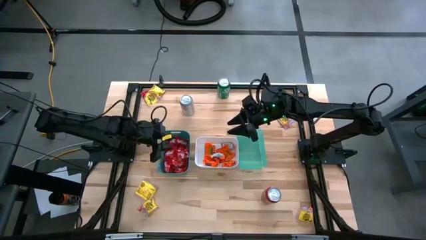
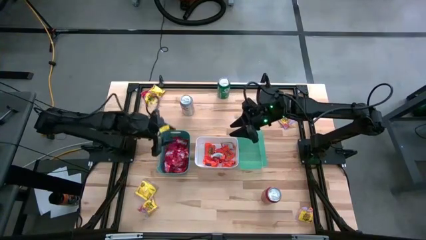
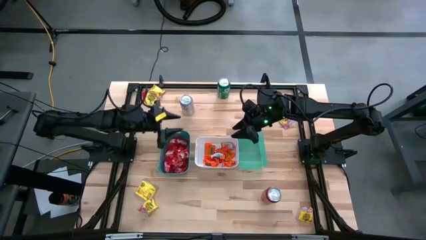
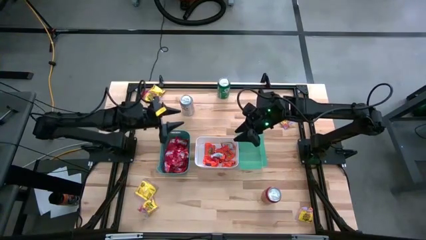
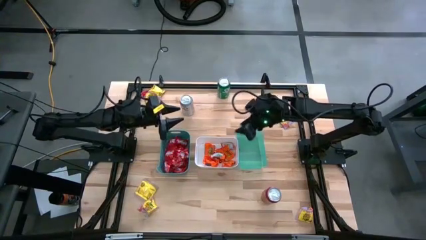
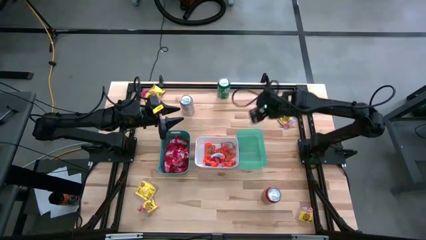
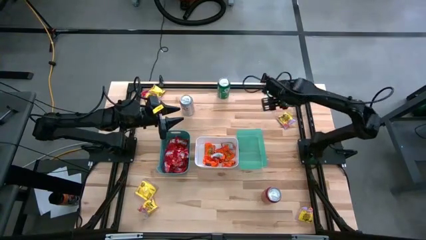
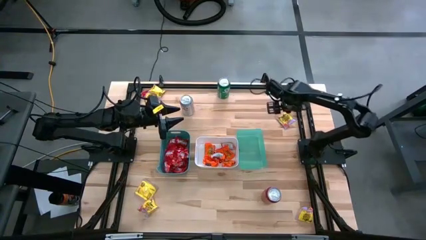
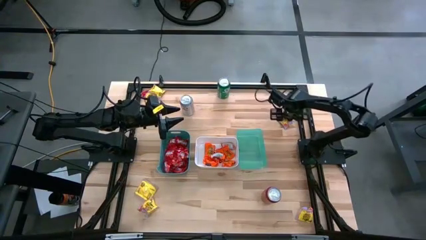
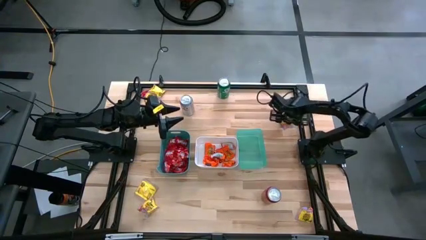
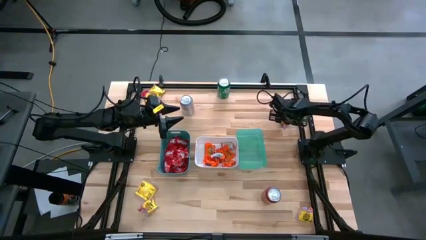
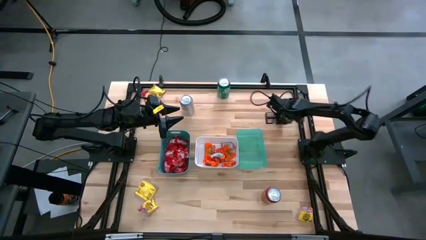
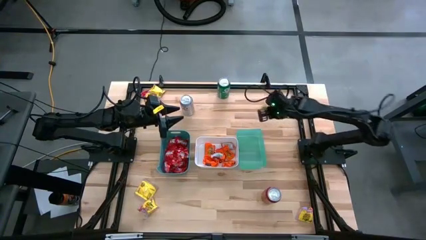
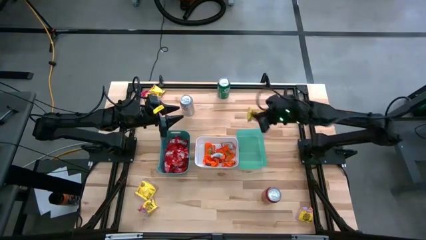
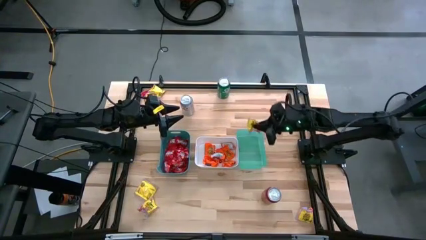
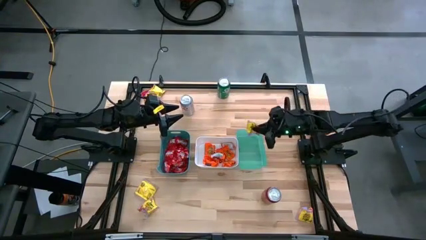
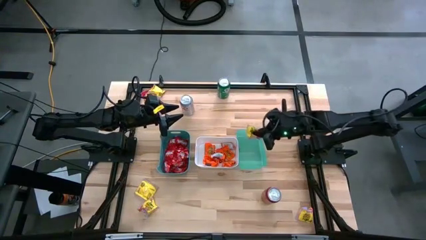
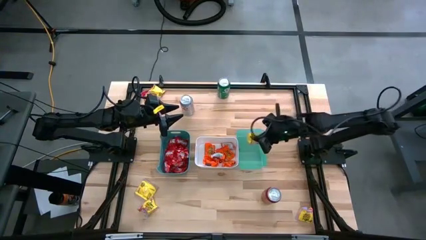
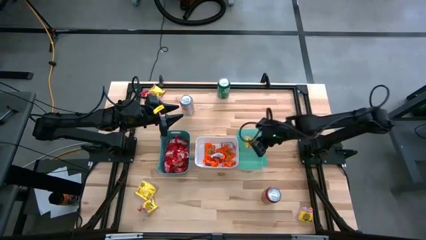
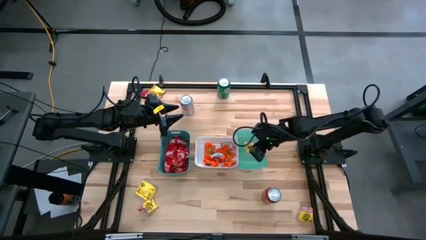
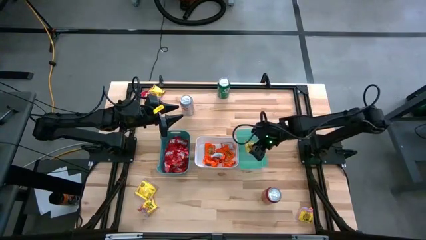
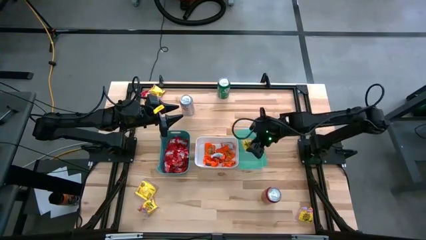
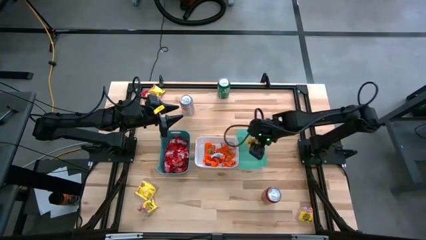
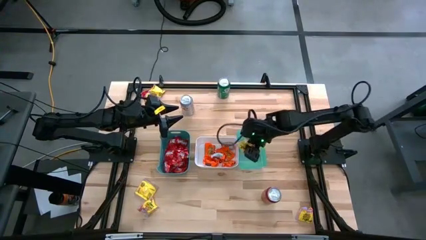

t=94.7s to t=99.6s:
Task: Sort candy
Put the yellow candy into the light green bin

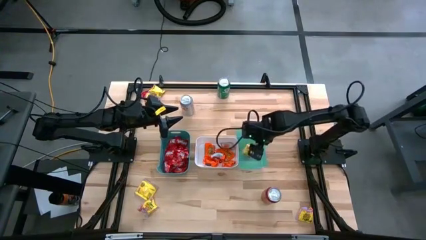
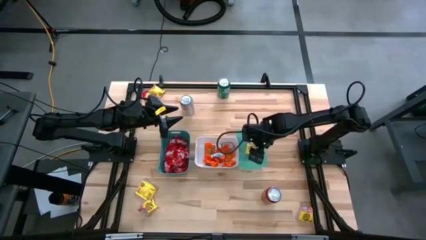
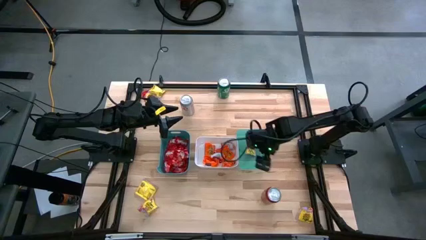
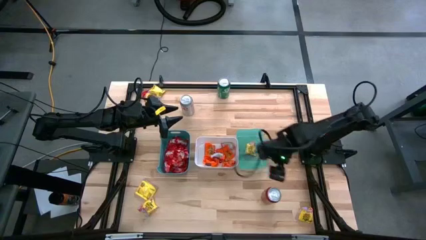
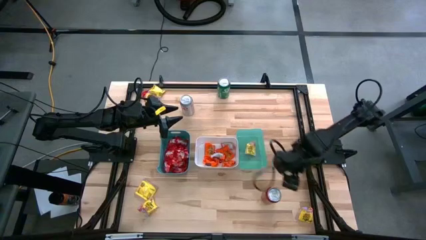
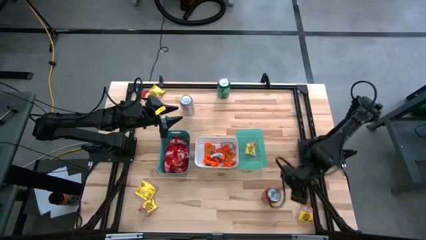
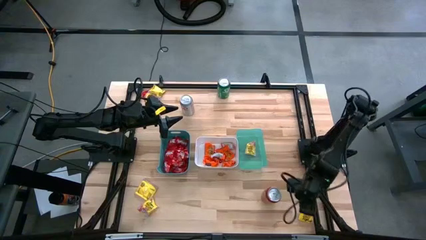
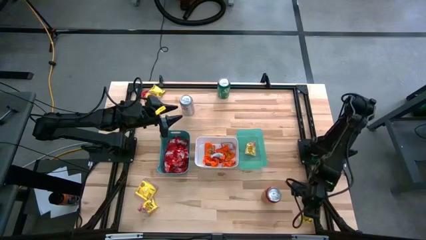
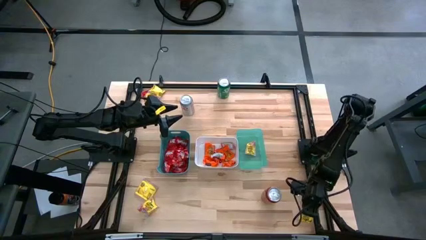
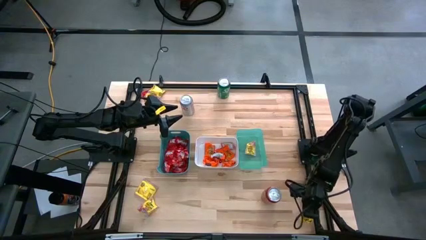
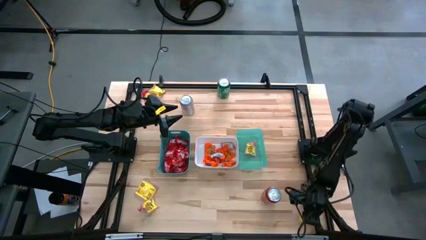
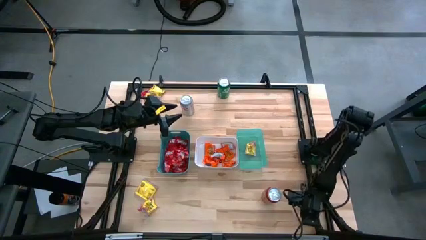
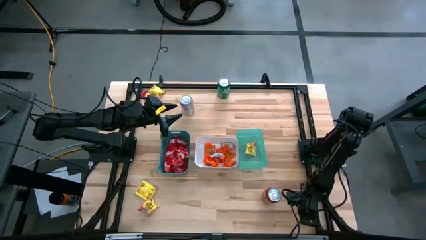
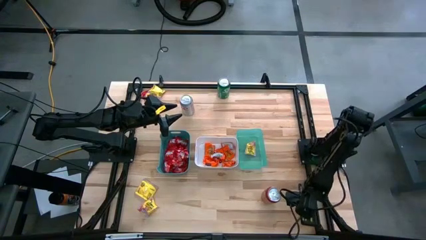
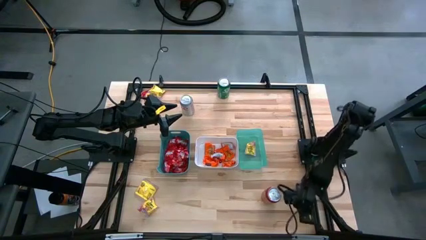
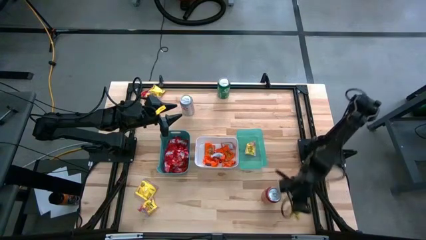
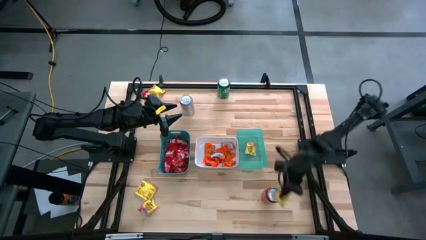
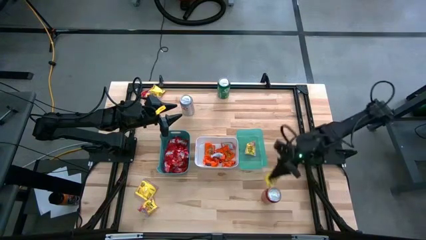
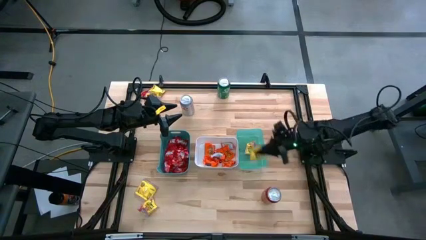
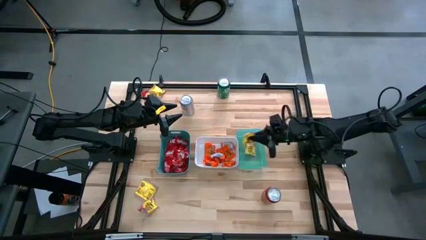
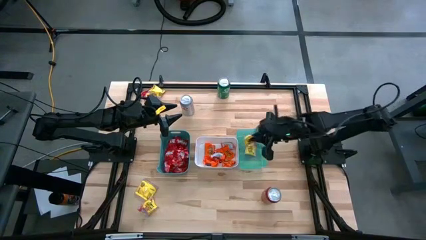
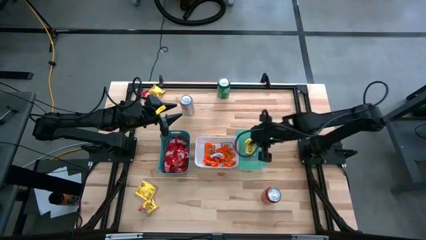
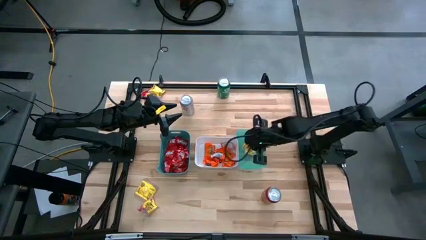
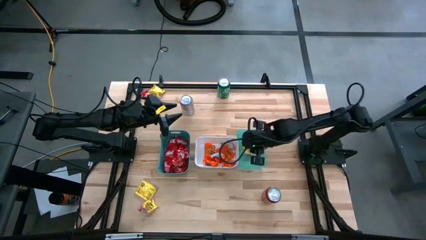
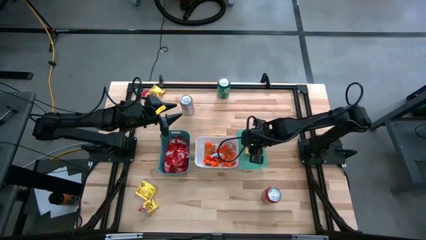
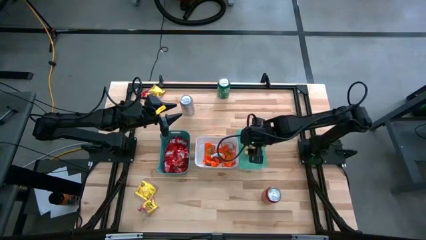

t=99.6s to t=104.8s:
Put the yellow candy into the light green bin

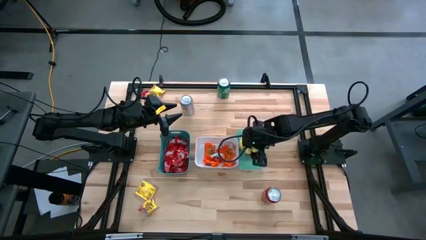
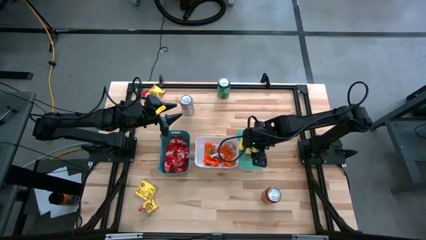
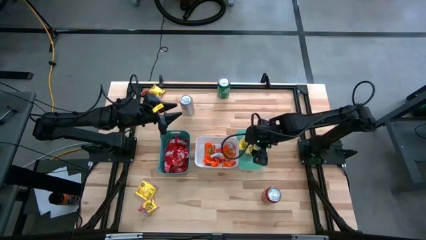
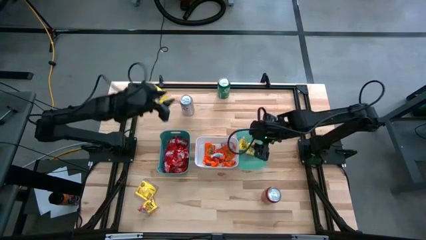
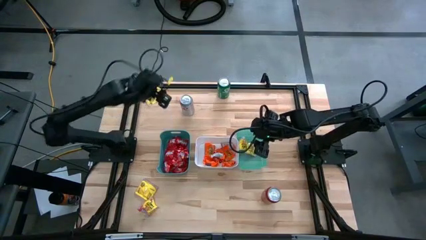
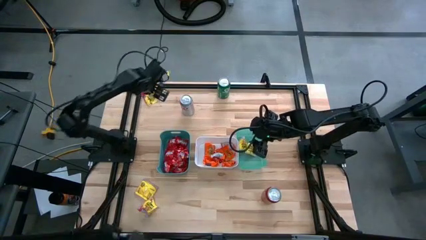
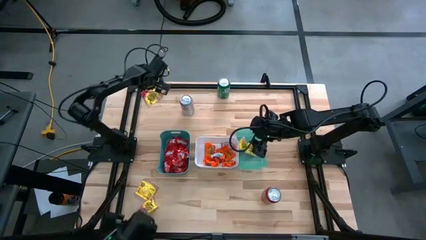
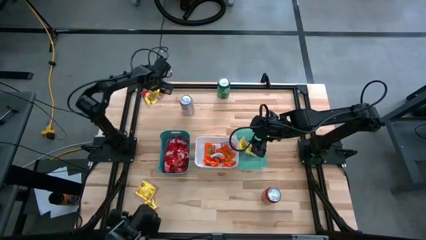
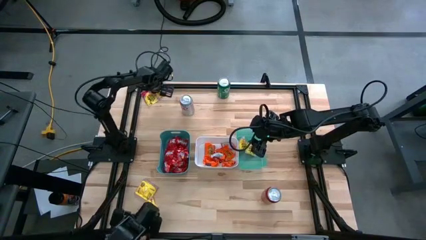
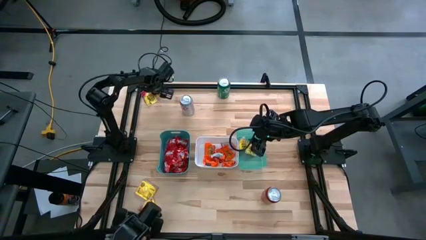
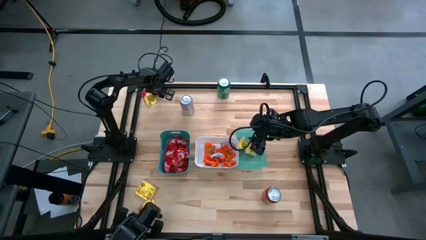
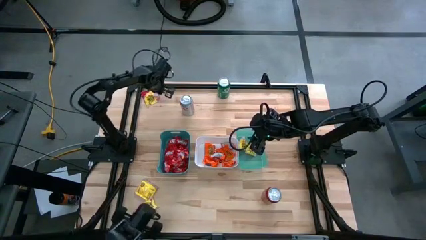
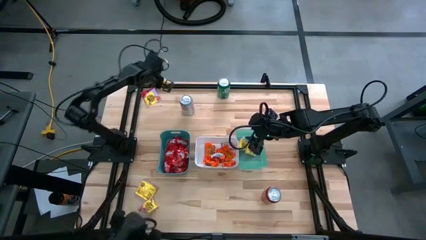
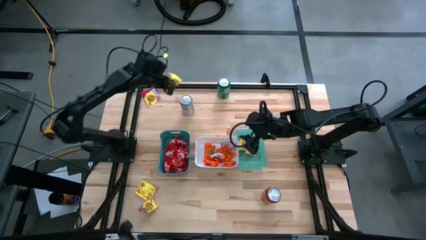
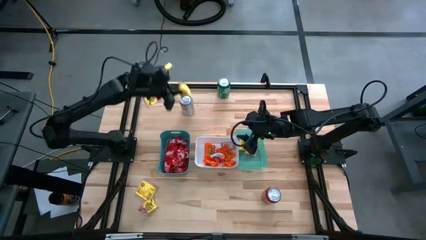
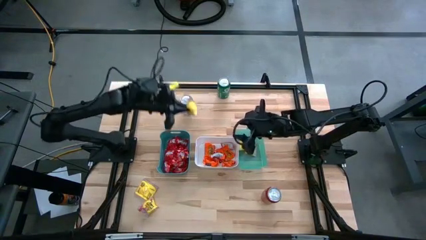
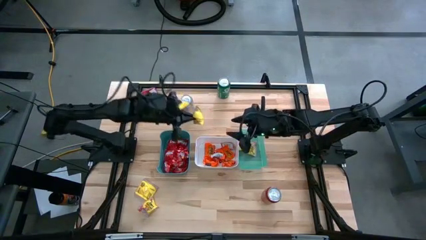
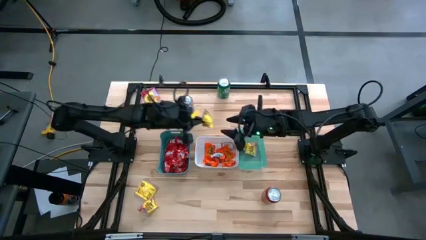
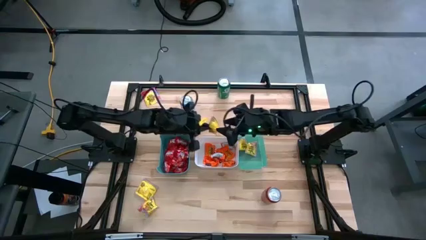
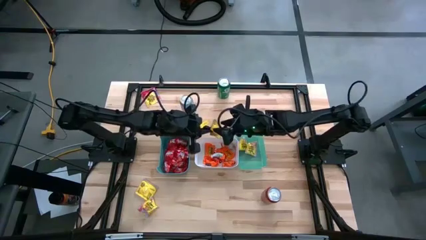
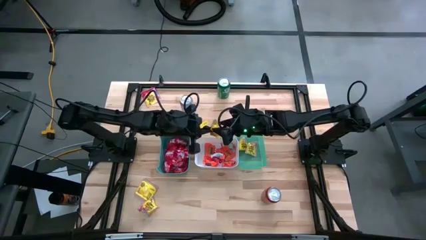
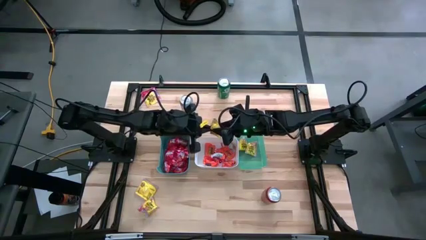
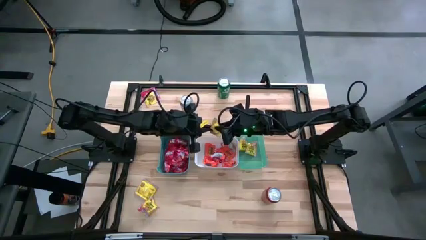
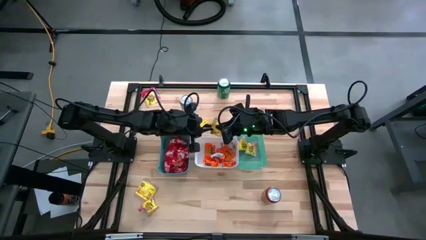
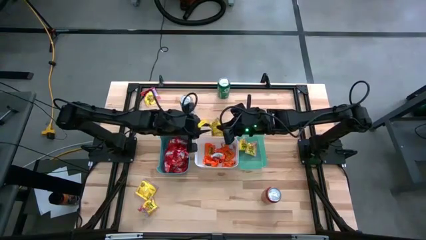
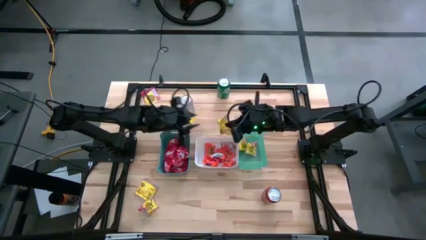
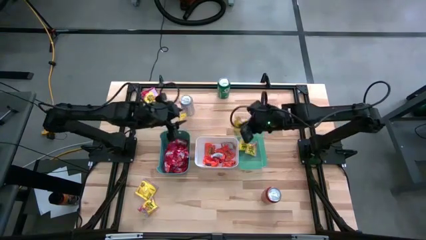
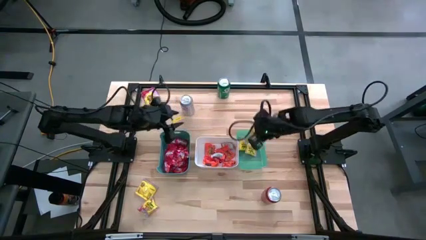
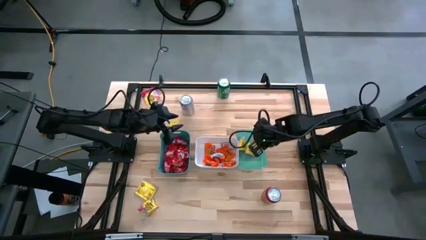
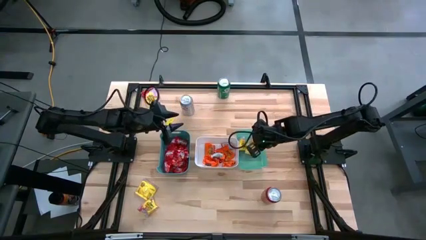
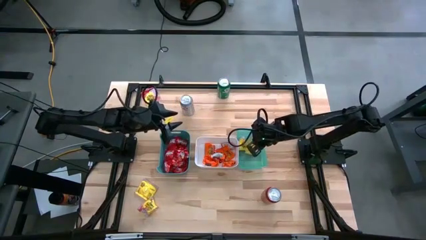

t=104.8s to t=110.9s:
Put the yellow candy into the light green bin

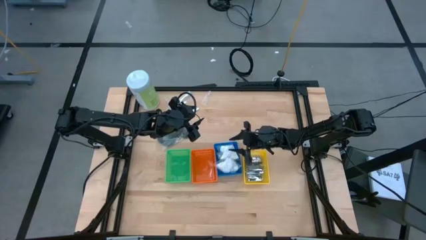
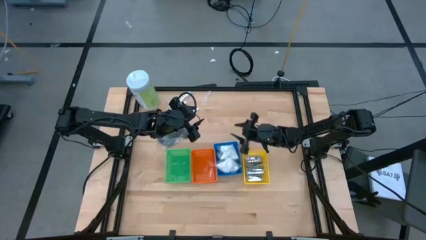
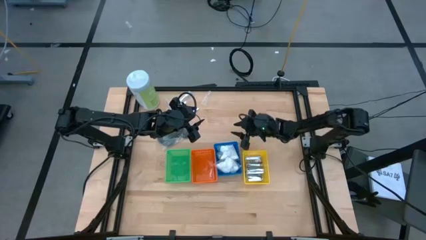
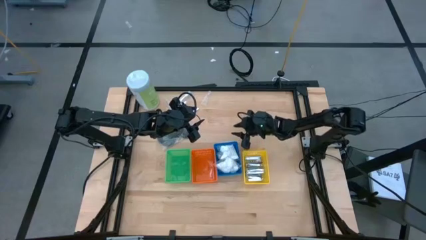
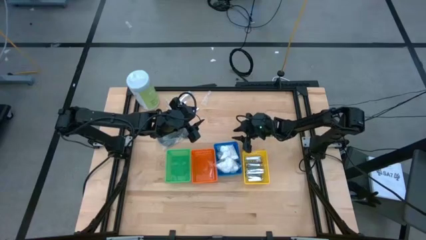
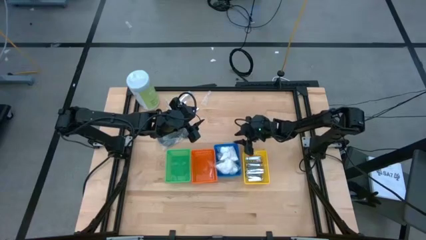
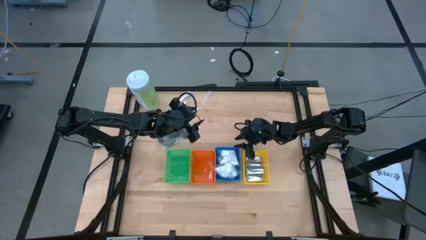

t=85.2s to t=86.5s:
Task: Pick & Place Travel size toiletries
Adjust the blue basket
